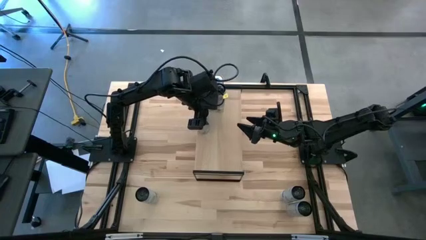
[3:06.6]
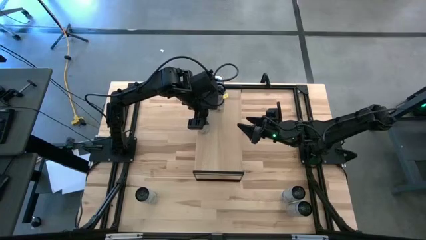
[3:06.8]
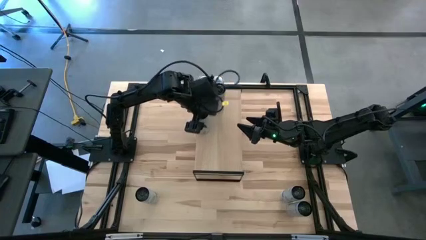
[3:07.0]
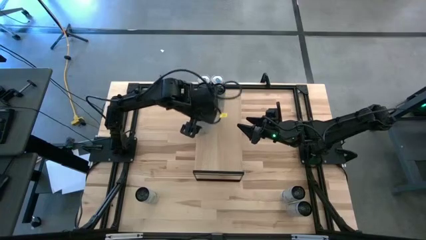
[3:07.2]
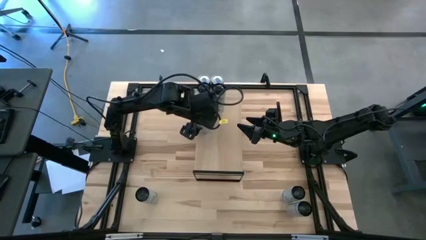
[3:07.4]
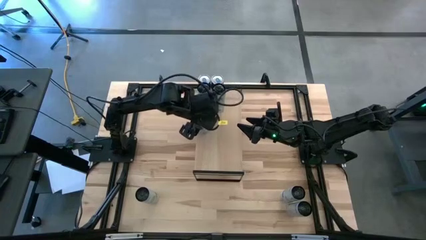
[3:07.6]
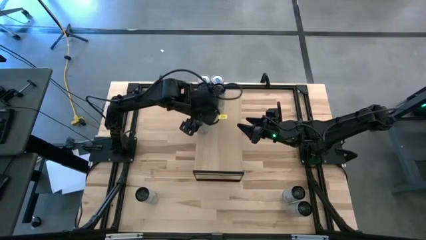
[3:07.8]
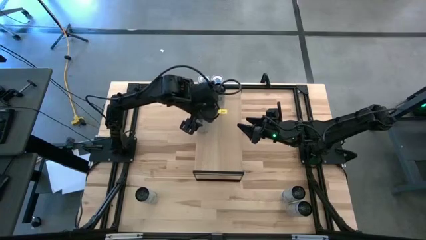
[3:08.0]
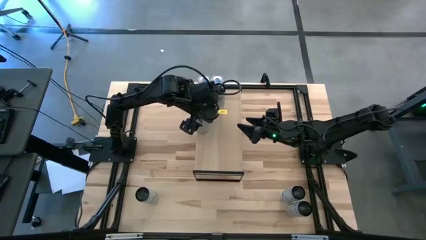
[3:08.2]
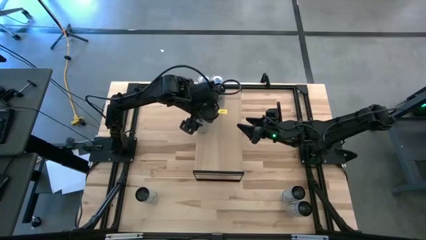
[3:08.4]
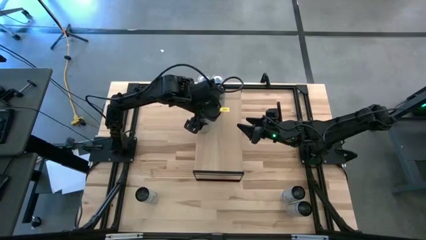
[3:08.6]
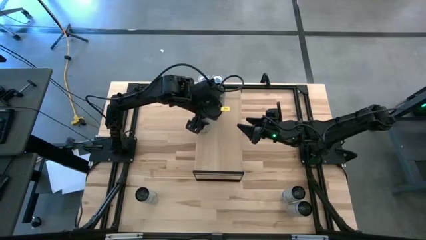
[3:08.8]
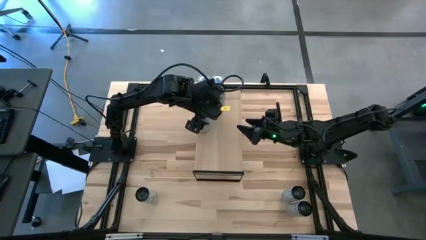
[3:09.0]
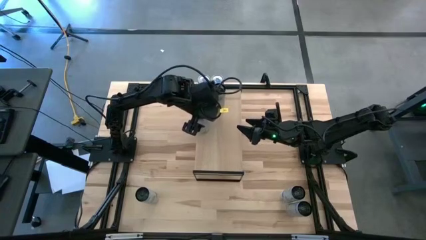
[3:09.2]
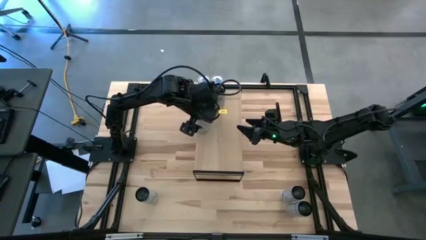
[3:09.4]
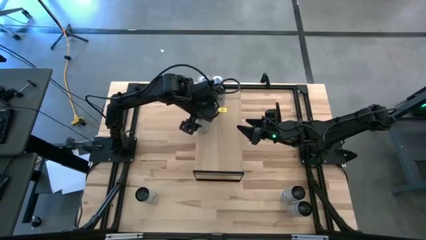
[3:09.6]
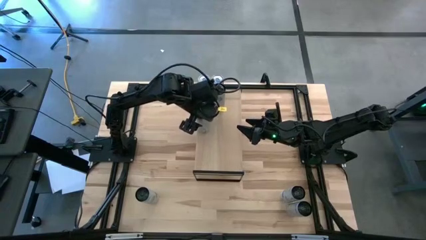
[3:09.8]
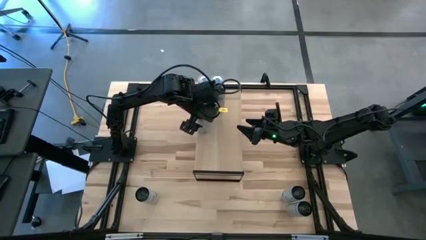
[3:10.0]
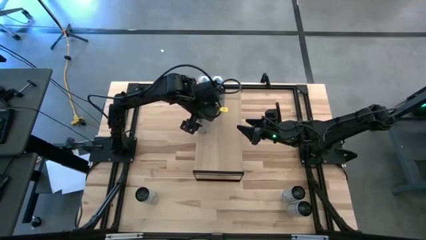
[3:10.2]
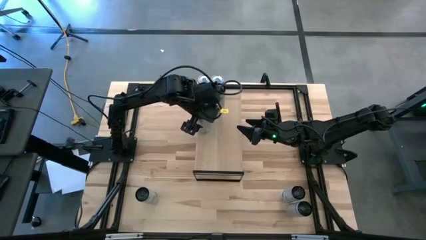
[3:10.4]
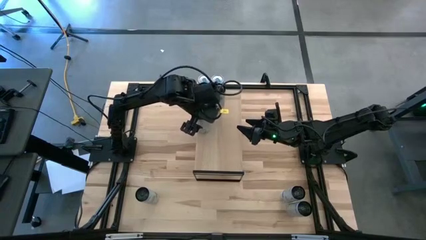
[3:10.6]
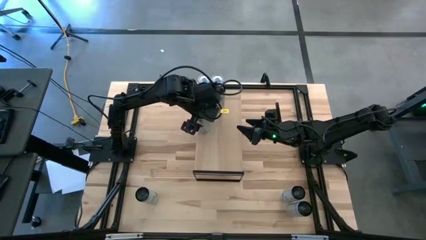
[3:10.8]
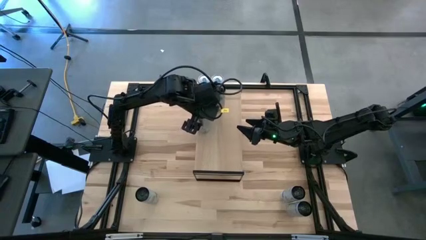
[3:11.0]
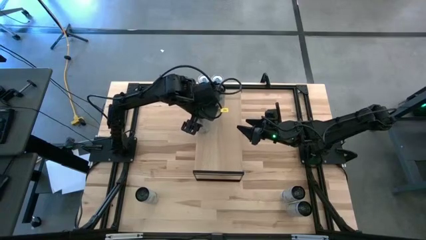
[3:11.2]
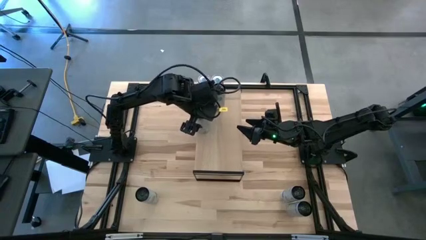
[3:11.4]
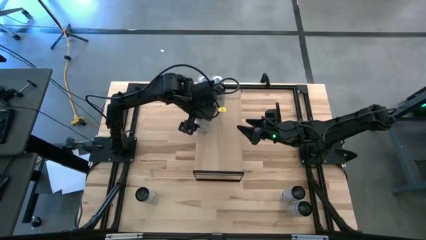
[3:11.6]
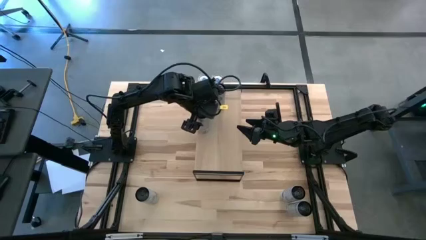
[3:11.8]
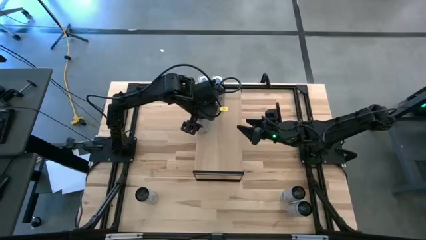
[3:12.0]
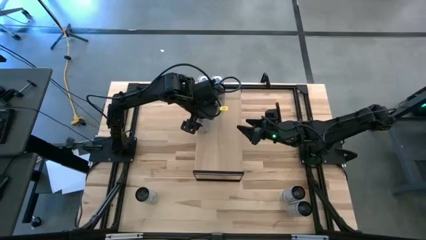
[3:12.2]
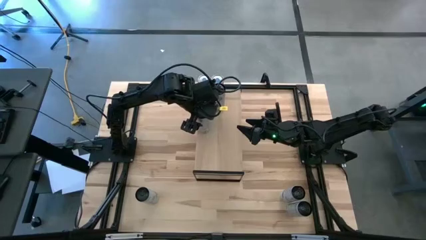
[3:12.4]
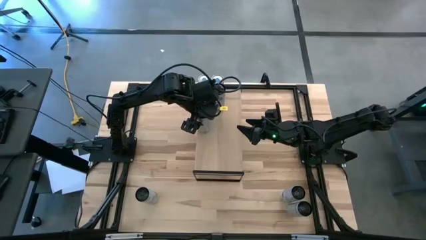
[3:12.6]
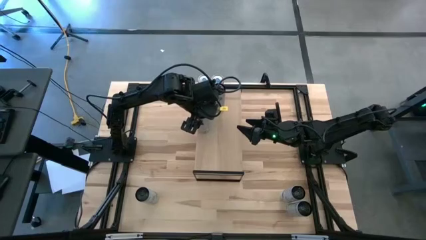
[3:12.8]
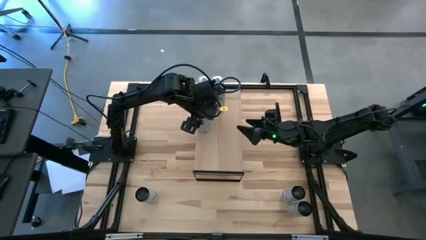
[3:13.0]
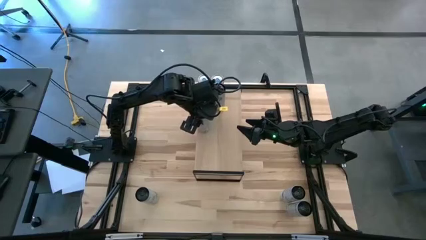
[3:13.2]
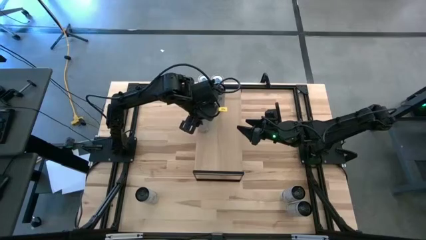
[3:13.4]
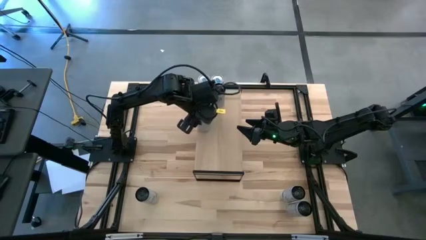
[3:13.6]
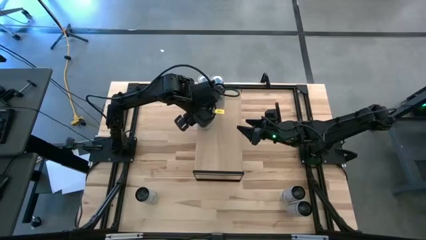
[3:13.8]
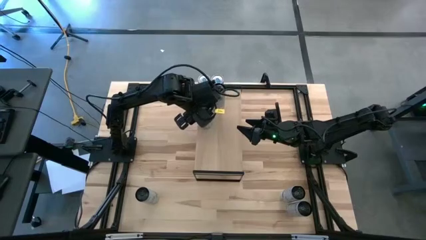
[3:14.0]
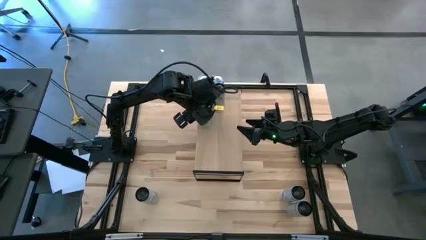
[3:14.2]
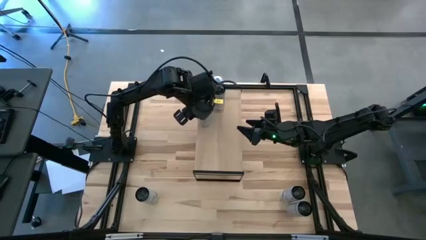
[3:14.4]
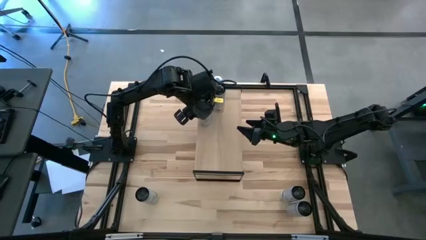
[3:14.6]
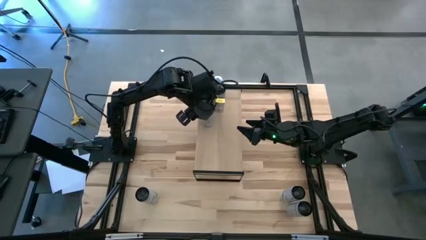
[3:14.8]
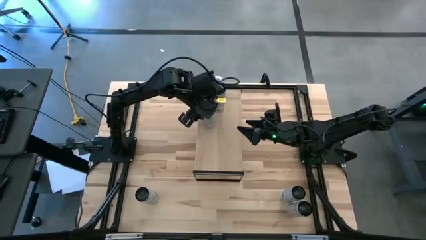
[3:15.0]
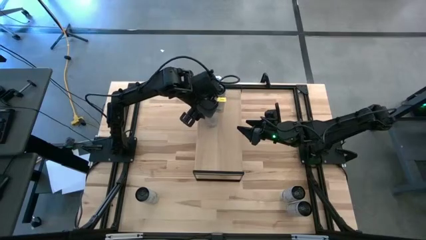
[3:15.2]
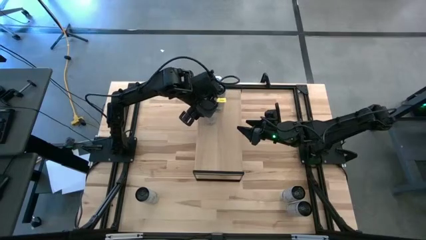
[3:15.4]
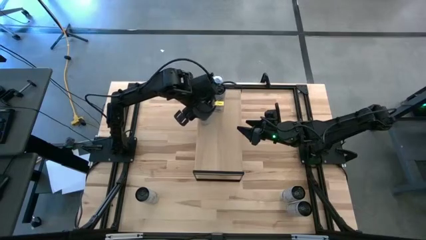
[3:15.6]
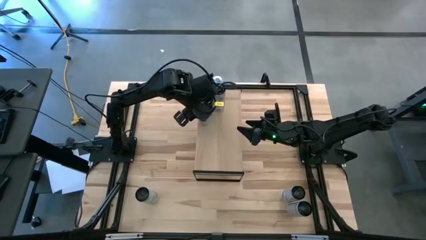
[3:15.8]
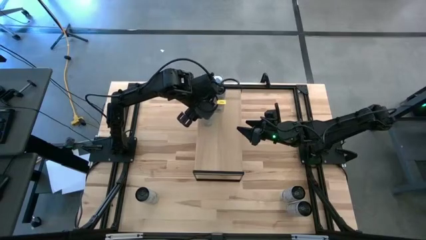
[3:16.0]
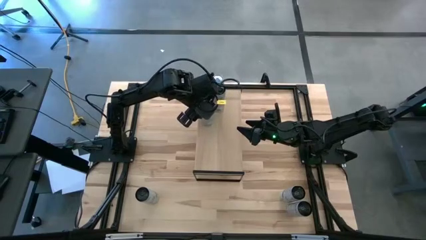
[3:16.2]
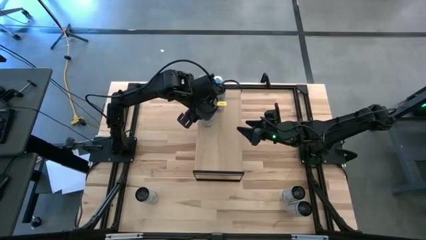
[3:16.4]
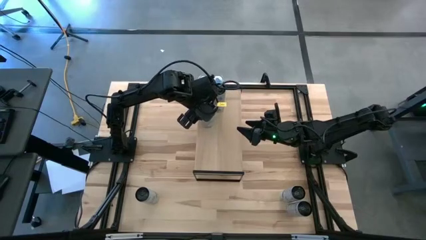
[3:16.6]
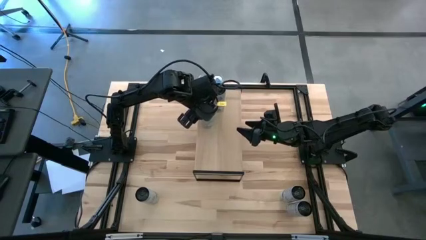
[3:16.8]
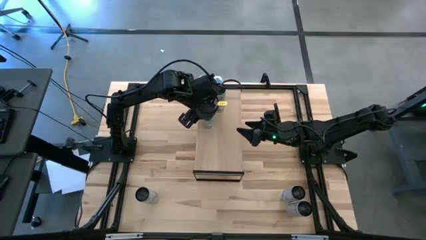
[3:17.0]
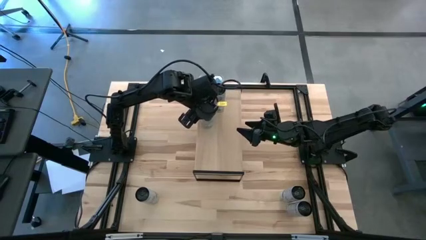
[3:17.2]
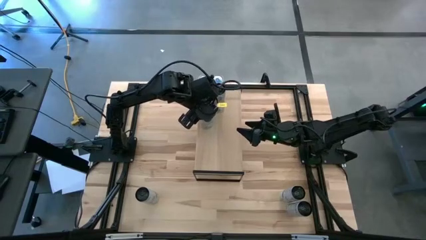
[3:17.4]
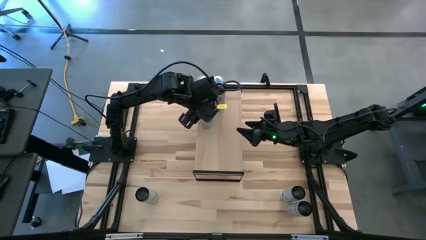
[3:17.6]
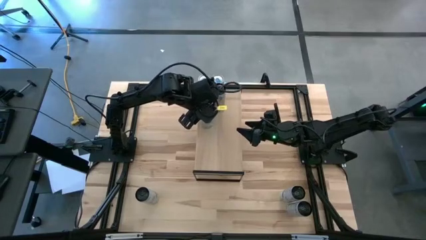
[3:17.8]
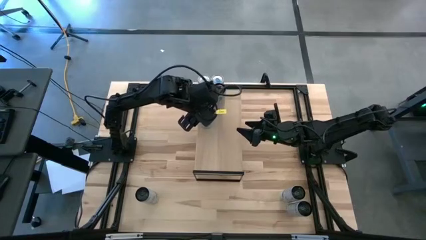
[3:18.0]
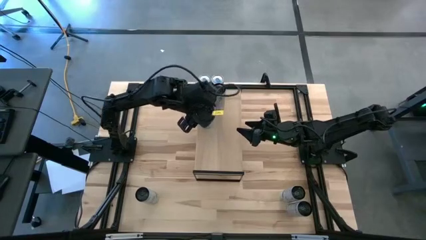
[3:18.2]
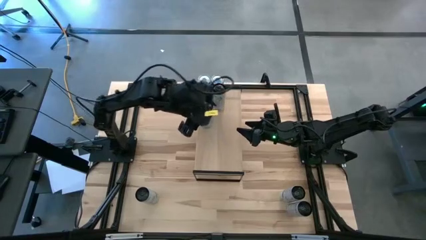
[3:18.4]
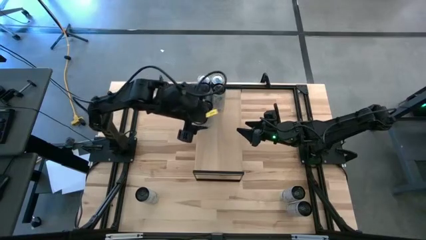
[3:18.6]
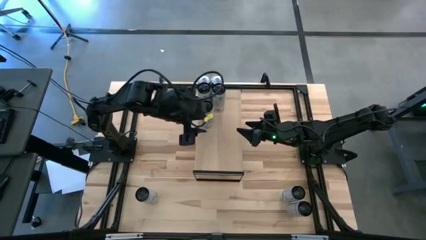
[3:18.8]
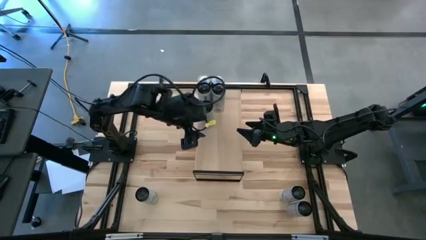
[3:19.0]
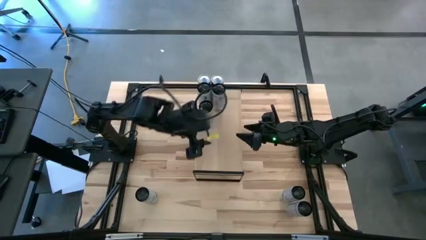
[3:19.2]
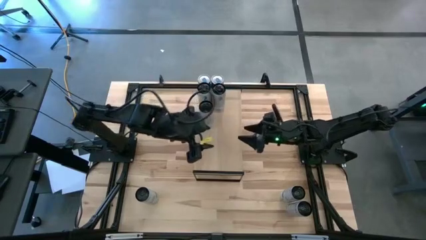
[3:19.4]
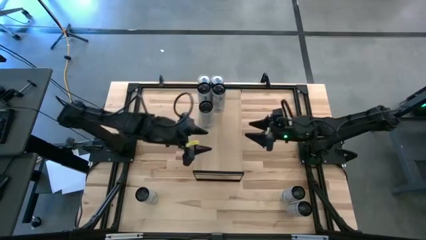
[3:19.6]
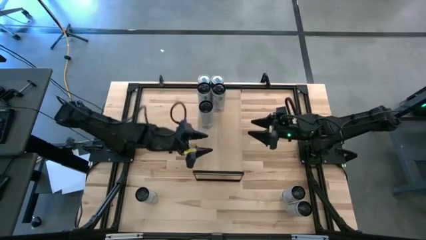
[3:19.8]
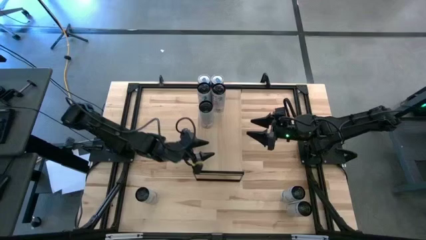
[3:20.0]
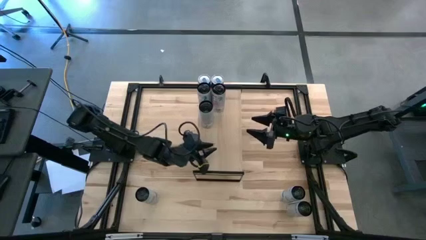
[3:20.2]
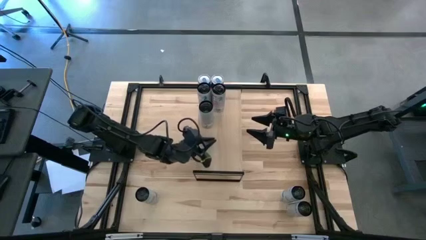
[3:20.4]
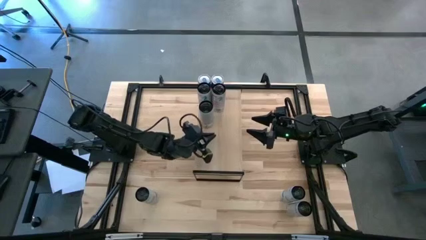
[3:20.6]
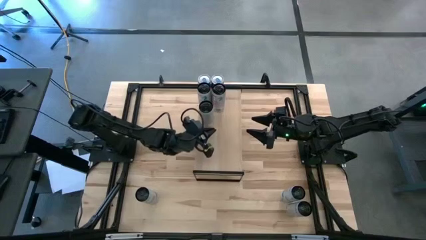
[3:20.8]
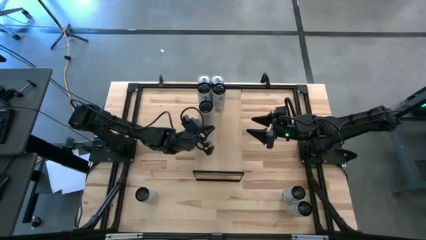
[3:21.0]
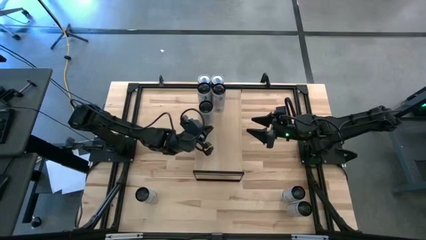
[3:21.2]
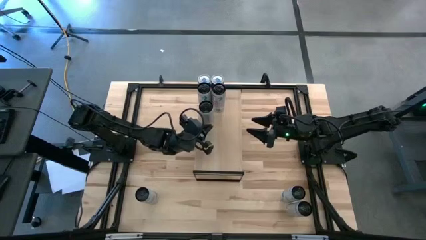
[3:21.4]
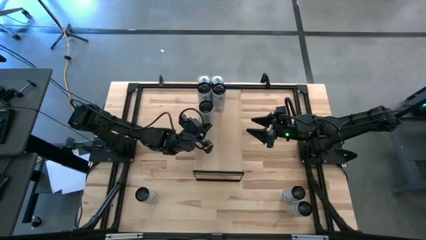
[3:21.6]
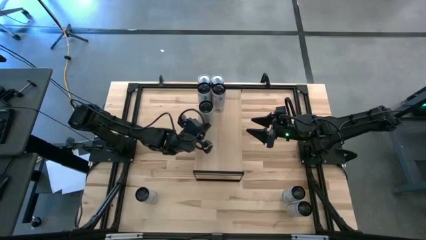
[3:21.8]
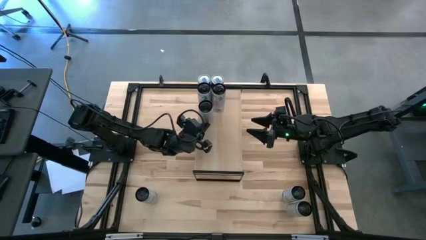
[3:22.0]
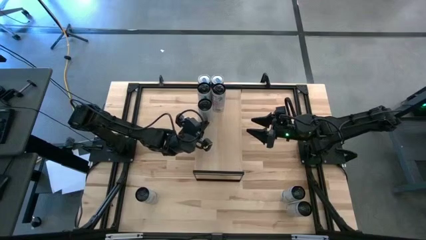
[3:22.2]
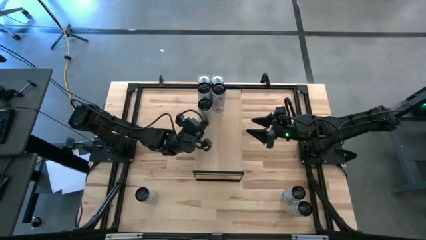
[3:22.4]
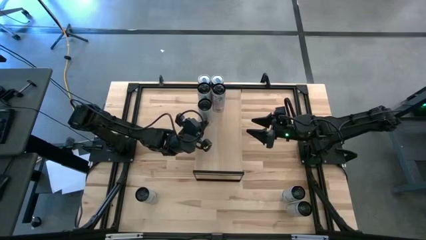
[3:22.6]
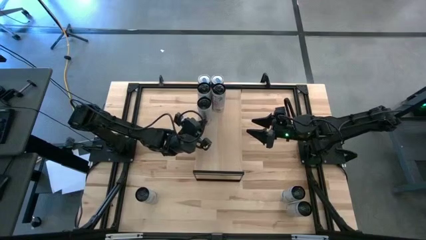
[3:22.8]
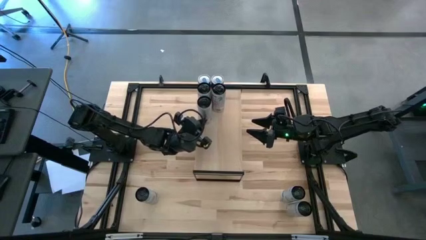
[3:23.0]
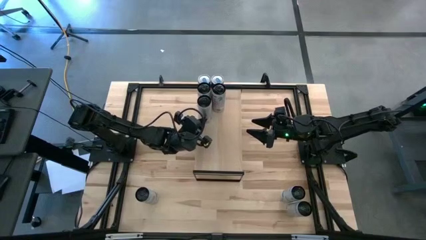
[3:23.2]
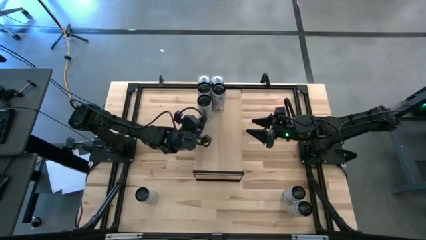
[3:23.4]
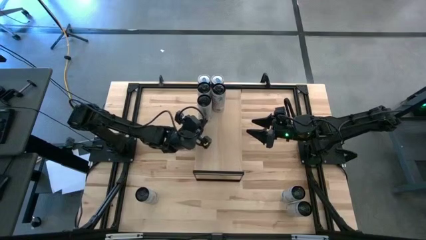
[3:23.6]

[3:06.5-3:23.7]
Task: Place canned beverage on shelf
Put the left white yellow soda can on the shelf
